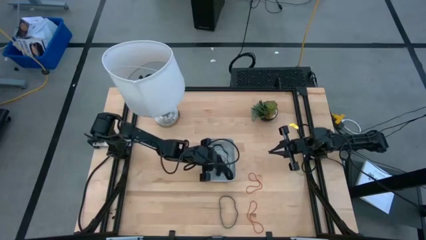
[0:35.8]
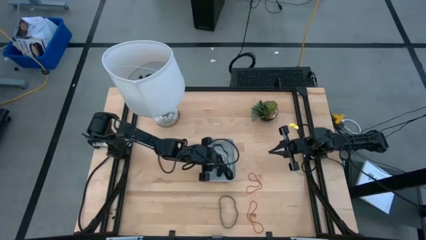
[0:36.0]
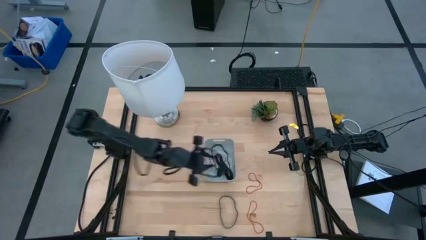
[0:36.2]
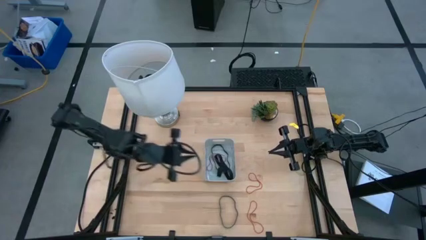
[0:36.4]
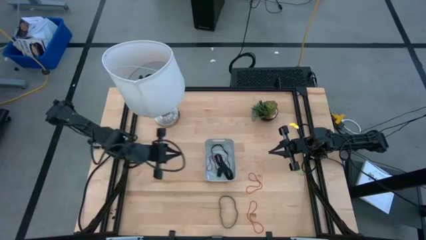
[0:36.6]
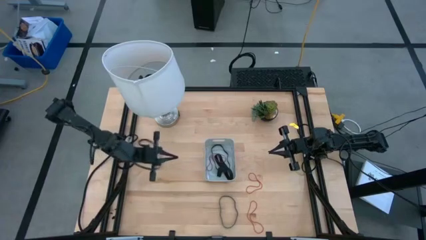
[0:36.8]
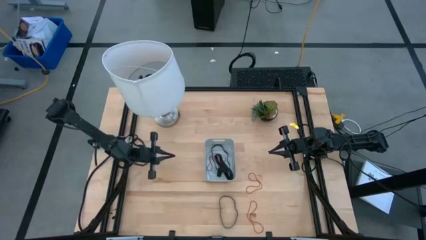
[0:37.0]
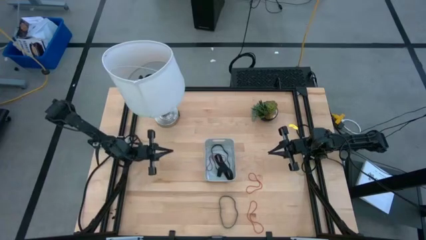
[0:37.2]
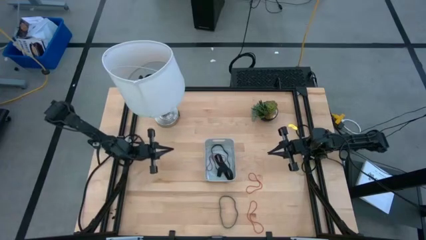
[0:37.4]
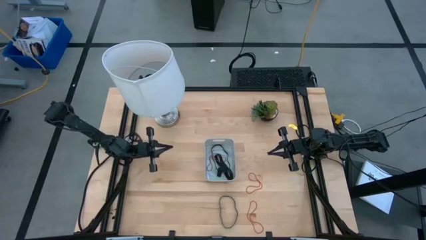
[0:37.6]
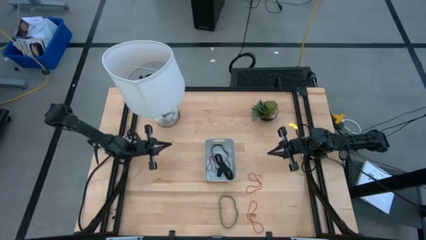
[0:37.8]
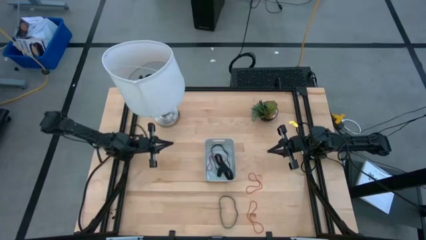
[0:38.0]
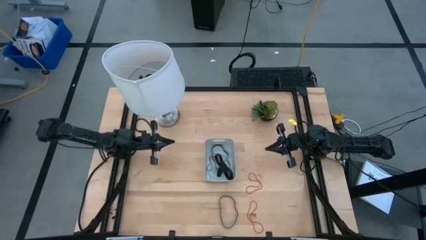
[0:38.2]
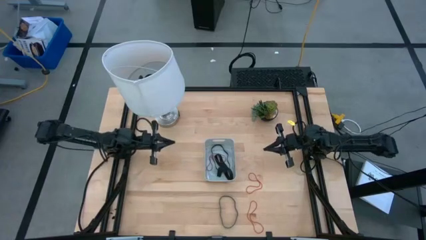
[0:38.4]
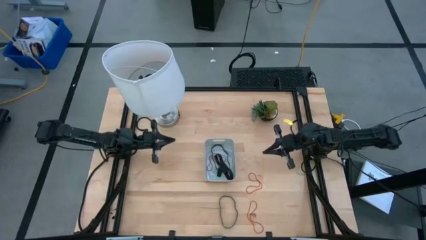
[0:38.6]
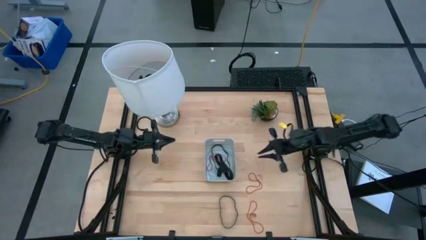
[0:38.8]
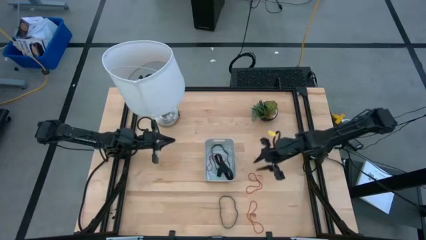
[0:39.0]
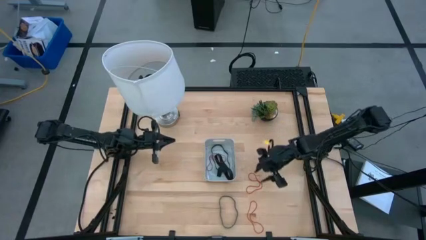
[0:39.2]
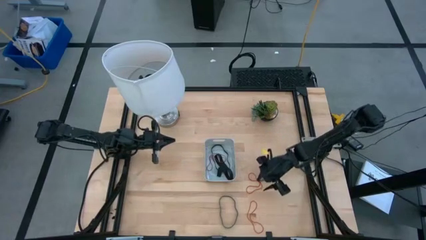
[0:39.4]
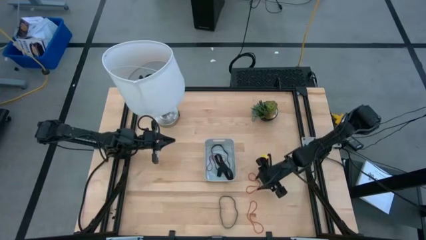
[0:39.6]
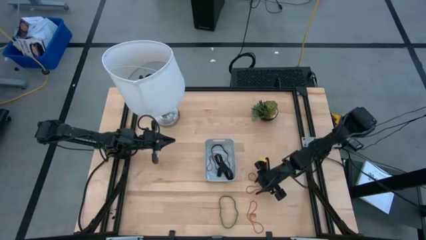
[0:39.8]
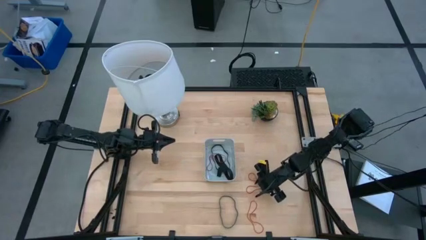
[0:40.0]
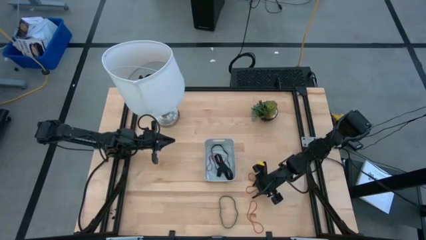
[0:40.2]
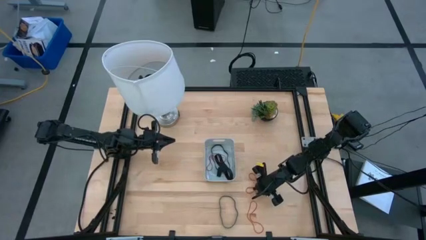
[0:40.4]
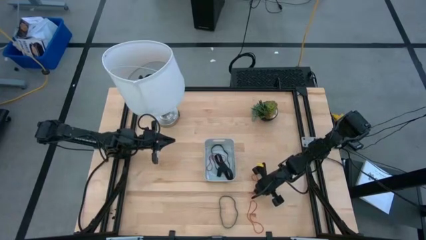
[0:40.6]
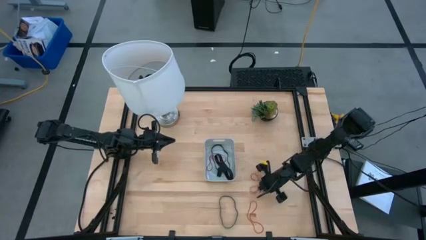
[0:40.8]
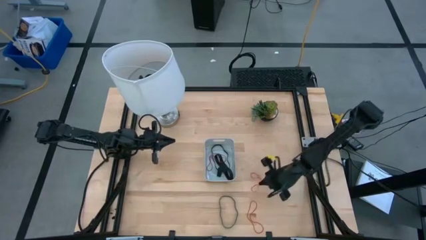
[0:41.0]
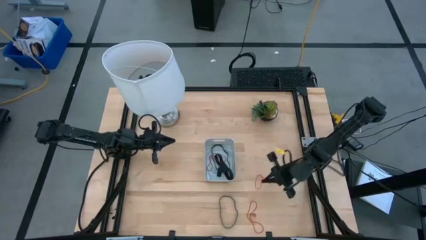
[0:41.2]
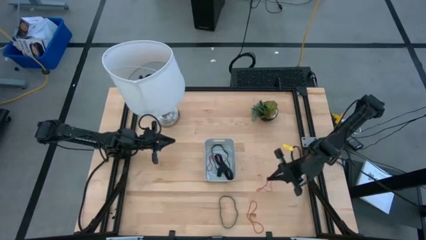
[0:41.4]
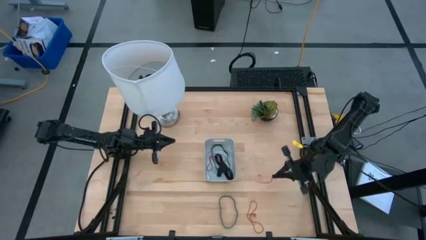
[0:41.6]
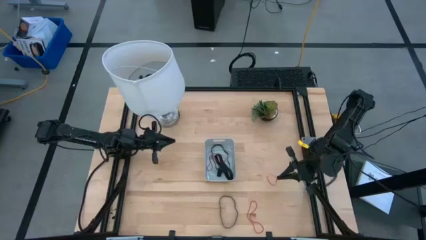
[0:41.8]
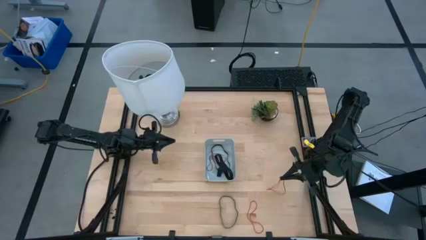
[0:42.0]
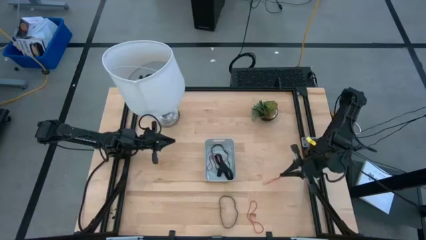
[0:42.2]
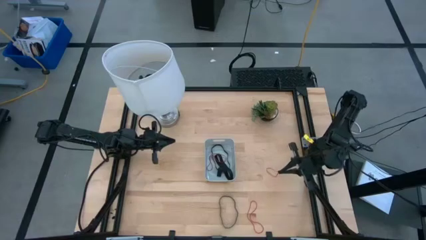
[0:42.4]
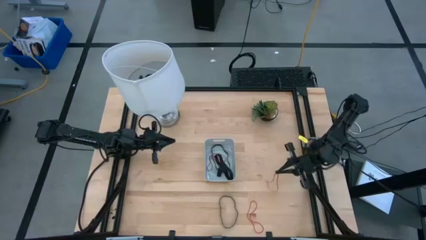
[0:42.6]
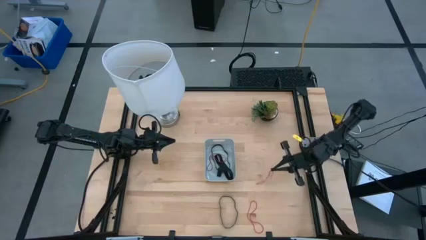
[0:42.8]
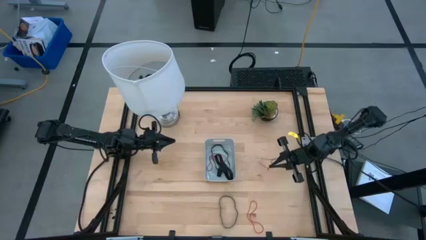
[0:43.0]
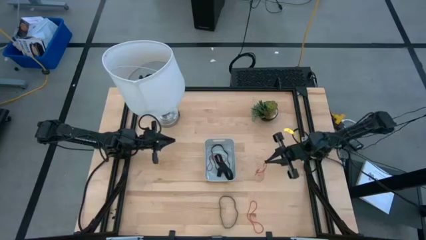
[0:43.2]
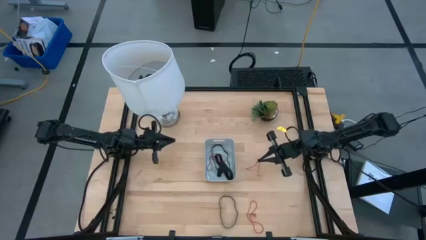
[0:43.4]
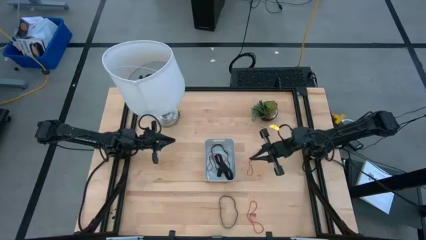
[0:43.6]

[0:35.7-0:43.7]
Task: Pick and place rubber bands into bin
Put the top red rubber band into the gray bin

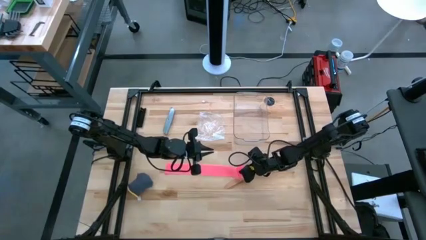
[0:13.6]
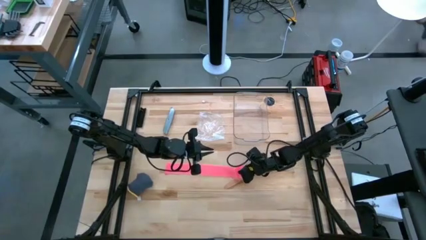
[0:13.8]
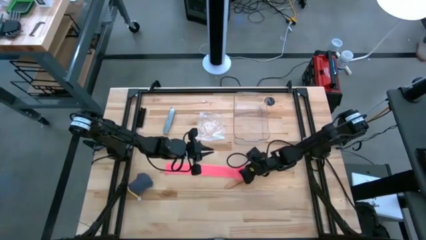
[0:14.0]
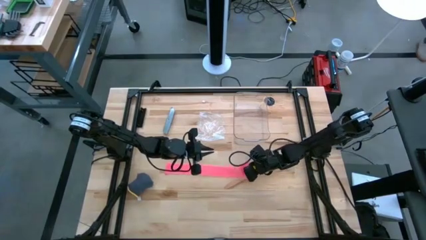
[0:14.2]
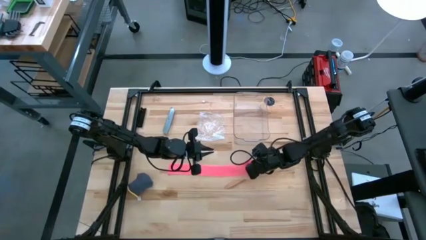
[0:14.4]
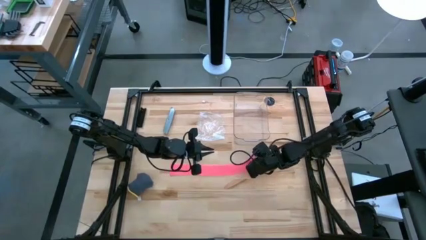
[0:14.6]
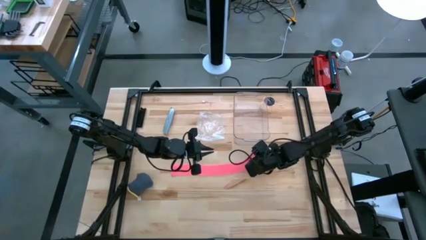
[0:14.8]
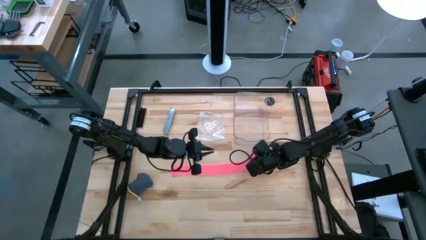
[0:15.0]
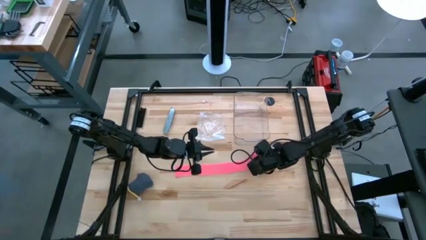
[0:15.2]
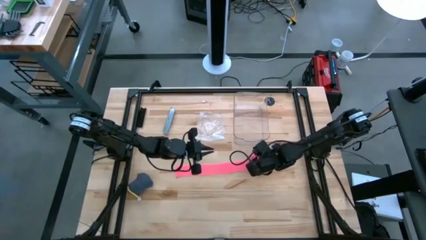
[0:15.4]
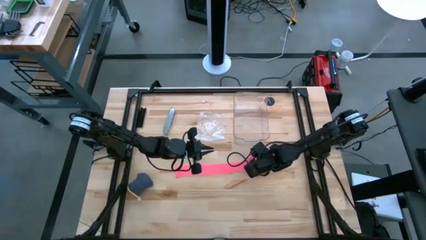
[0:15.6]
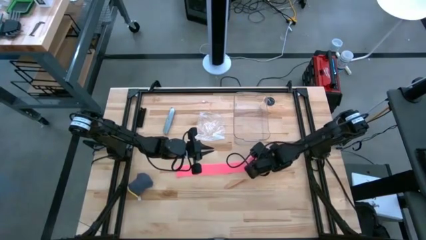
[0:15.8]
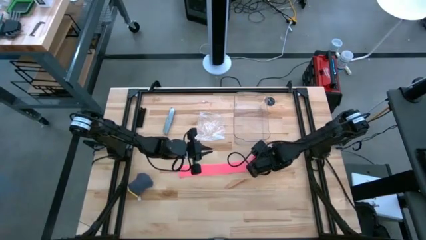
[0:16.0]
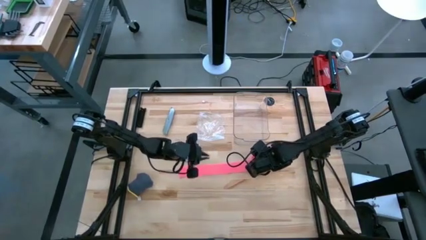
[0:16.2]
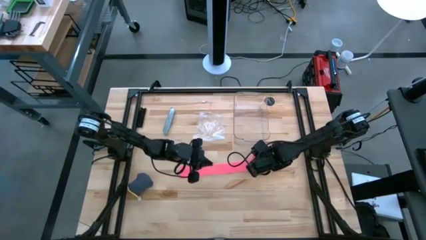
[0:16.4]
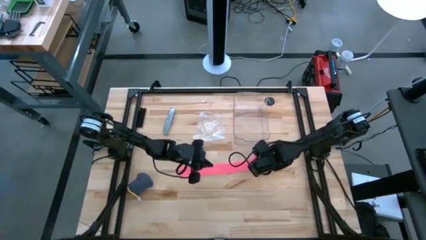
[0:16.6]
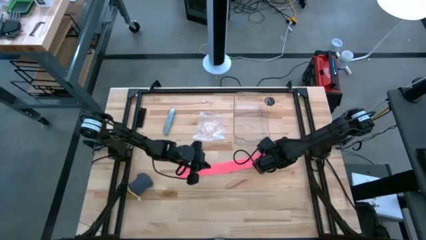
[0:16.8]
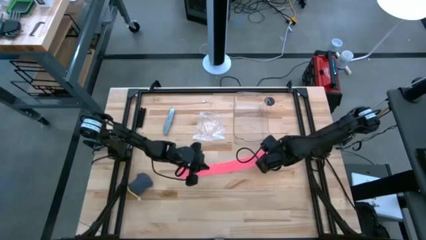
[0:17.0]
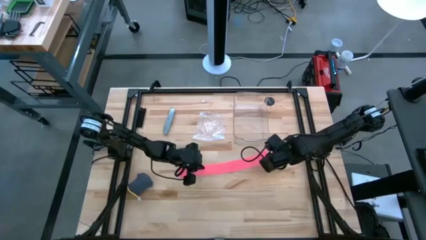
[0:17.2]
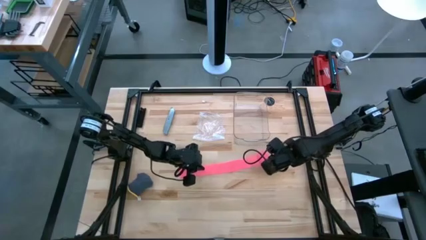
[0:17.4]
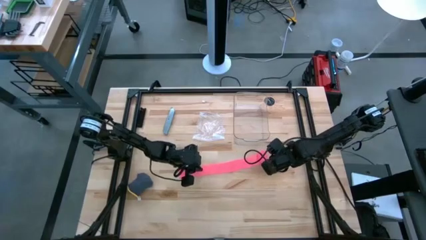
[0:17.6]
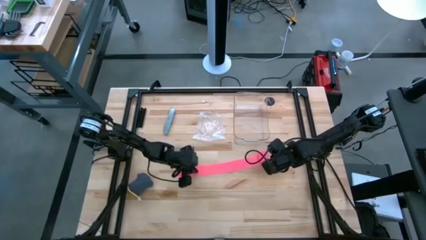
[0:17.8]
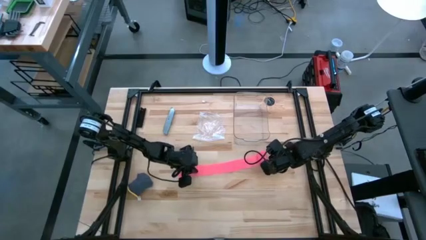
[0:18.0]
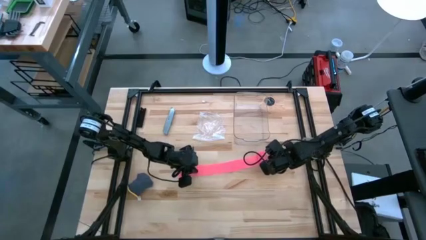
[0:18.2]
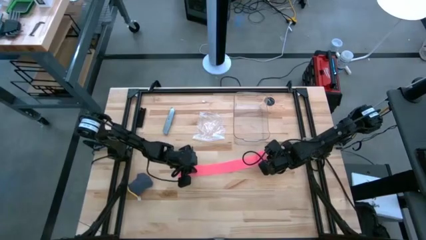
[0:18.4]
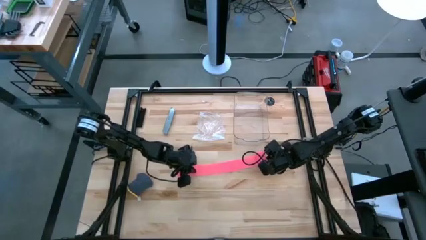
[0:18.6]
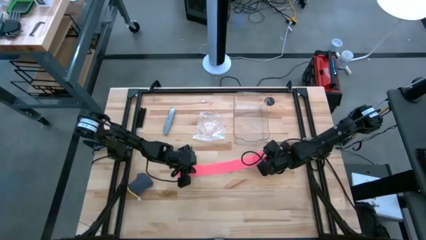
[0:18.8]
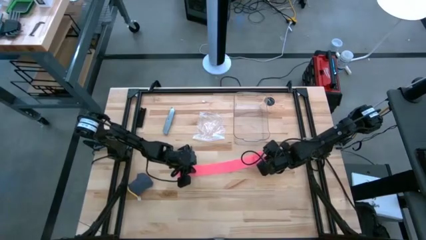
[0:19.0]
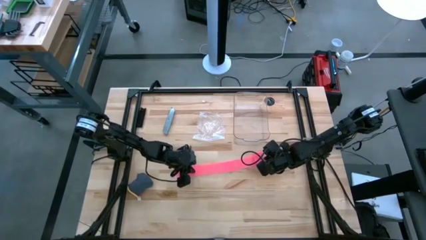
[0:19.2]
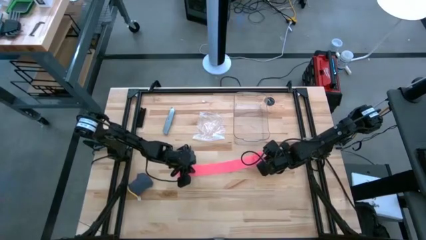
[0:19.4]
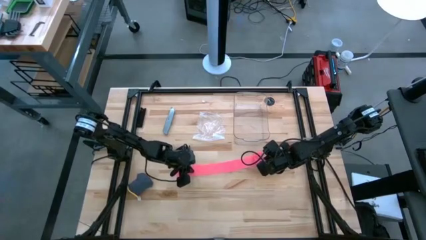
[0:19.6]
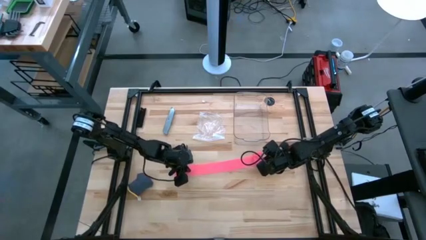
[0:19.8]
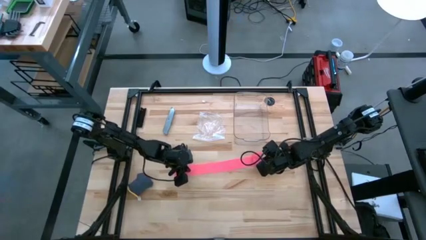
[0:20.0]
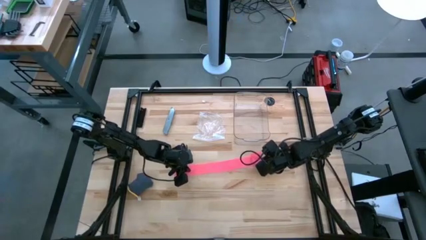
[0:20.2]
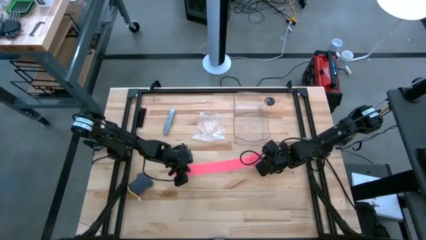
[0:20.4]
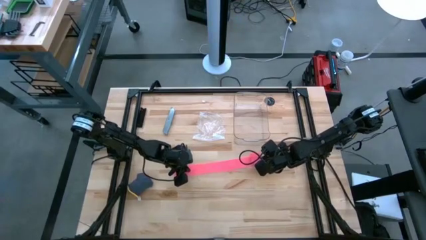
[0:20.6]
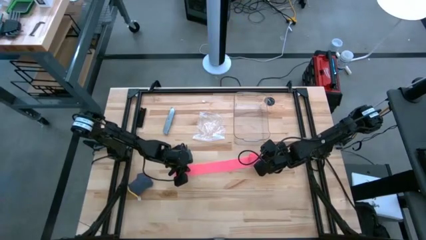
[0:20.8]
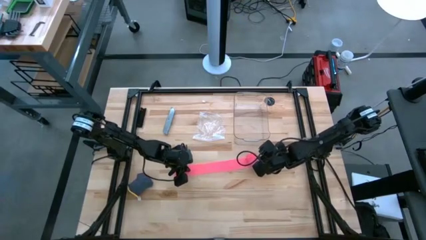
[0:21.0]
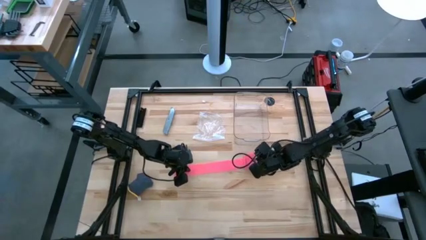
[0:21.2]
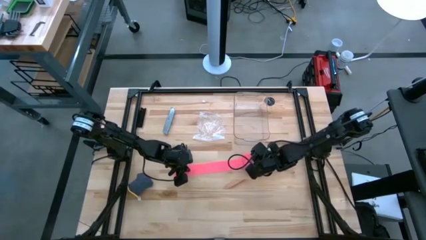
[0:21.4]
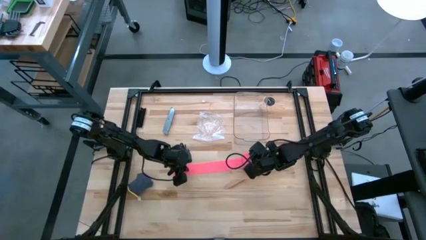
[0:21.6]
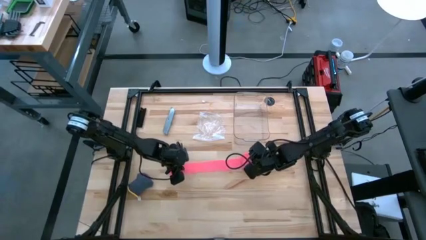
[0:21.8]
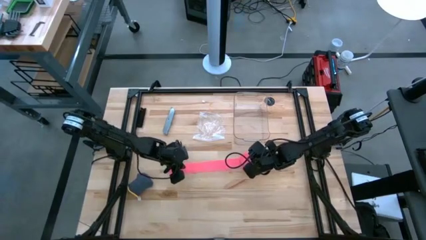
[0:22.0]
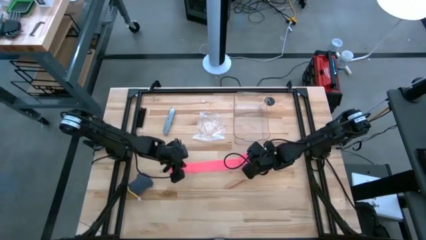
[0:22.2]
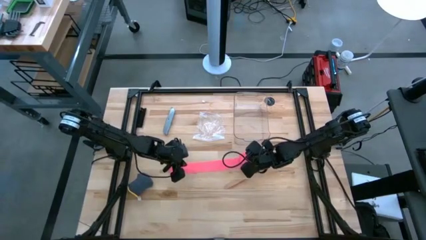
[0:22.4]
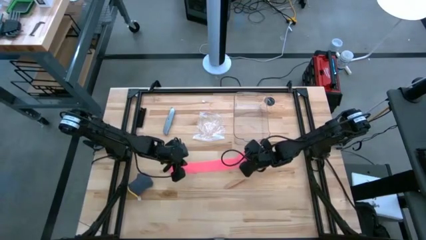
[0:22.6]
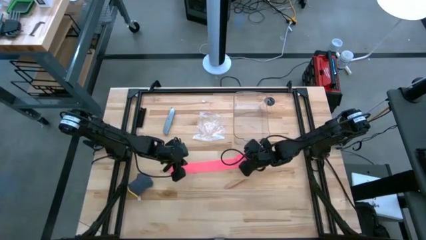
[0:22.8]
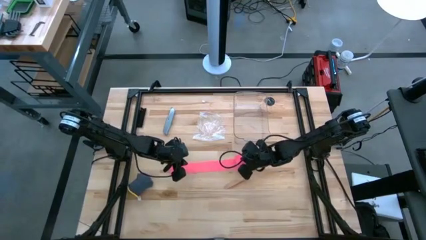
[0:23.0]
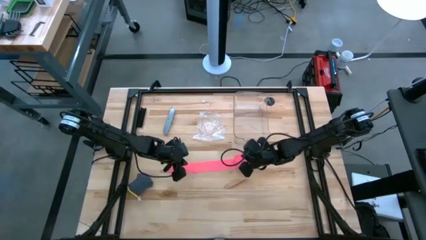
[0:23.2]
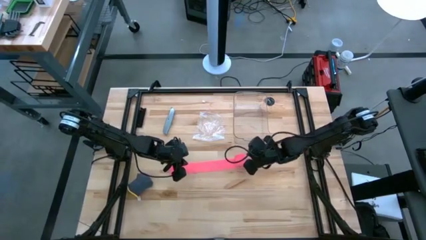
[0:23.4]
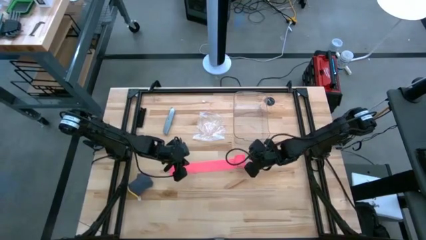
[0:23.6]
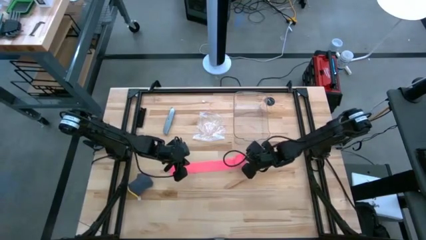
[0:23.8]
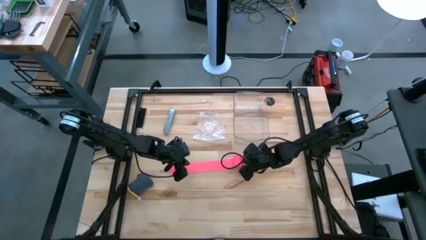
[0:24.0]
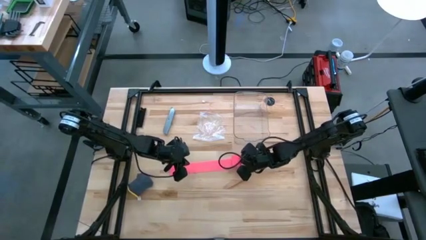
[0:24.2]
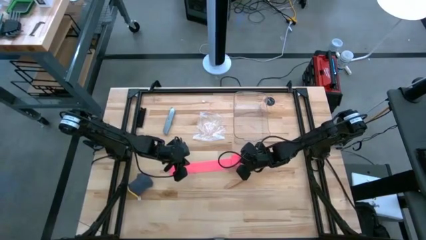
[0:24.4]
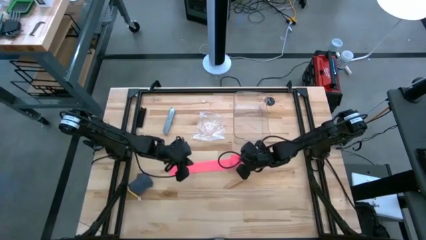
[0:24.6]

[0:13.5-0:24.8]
Task: Roll bandage
Roll the pink bandage
